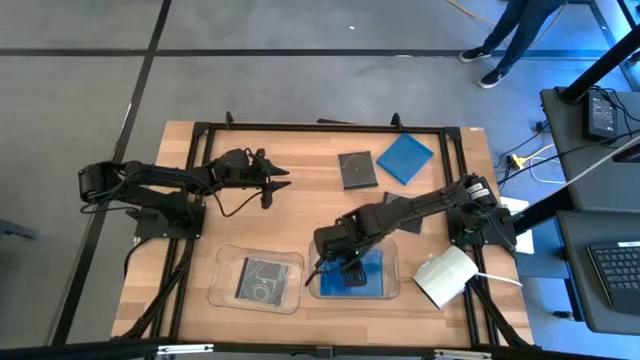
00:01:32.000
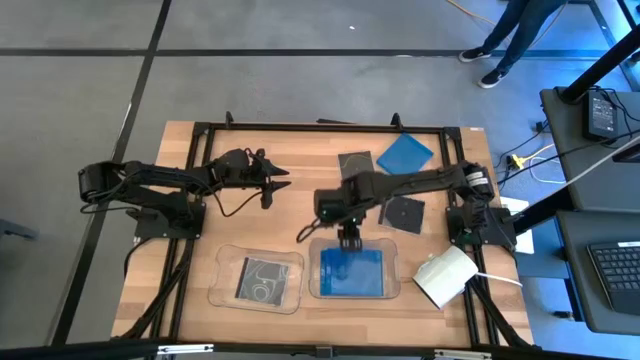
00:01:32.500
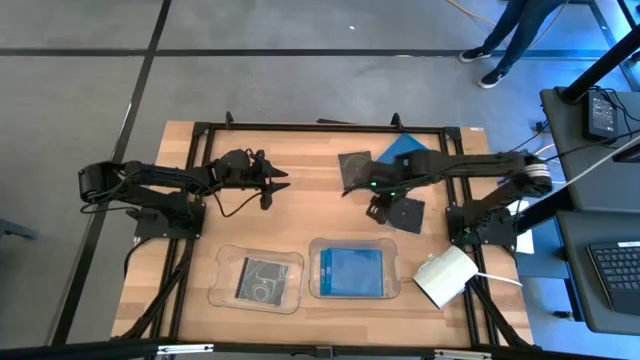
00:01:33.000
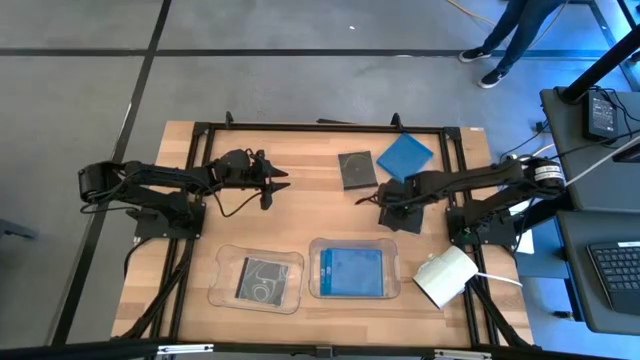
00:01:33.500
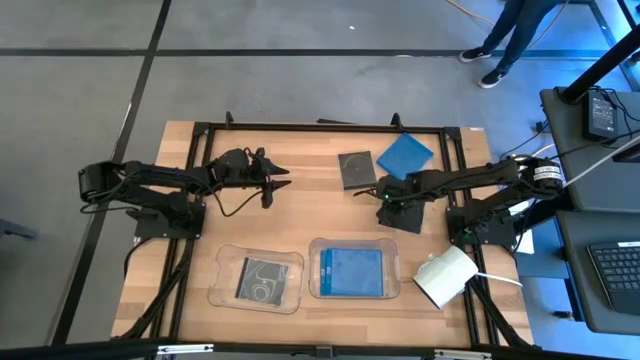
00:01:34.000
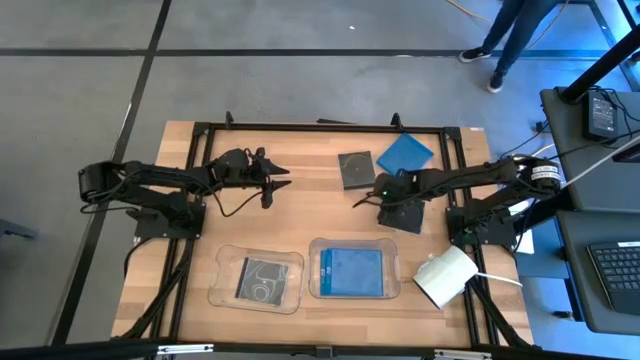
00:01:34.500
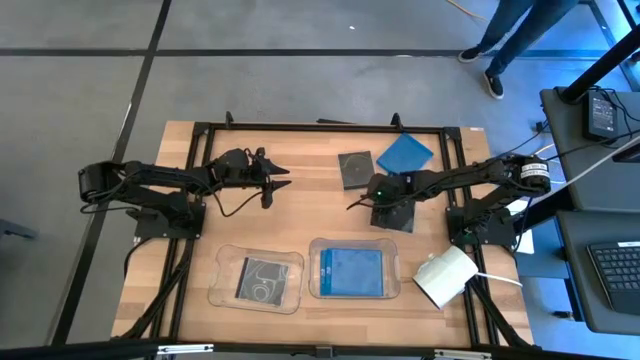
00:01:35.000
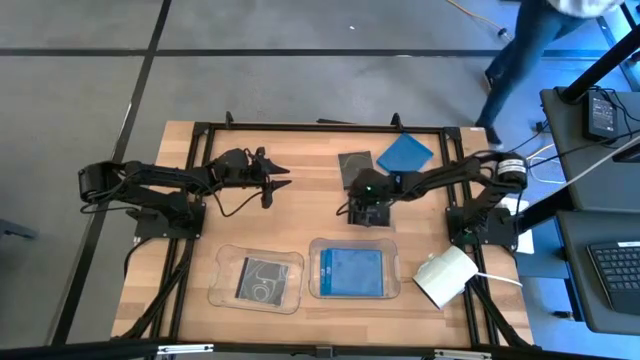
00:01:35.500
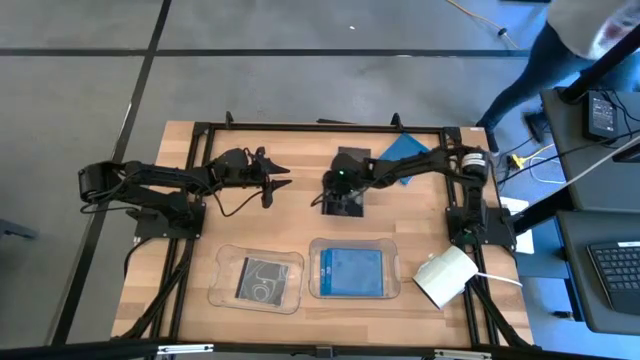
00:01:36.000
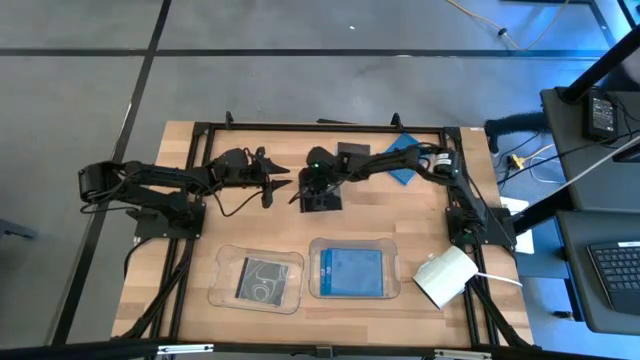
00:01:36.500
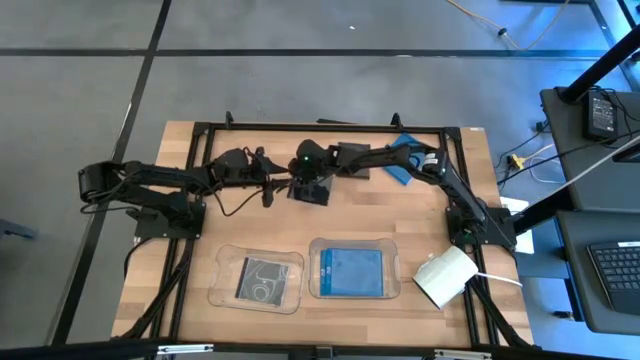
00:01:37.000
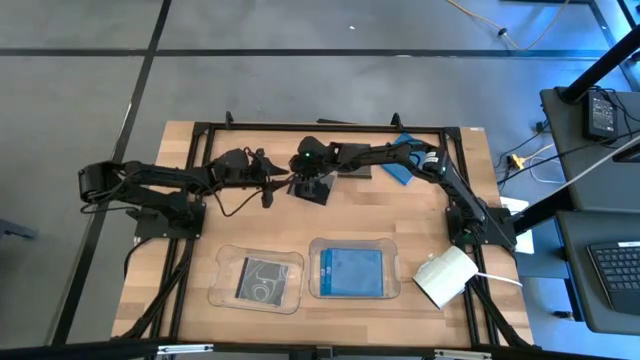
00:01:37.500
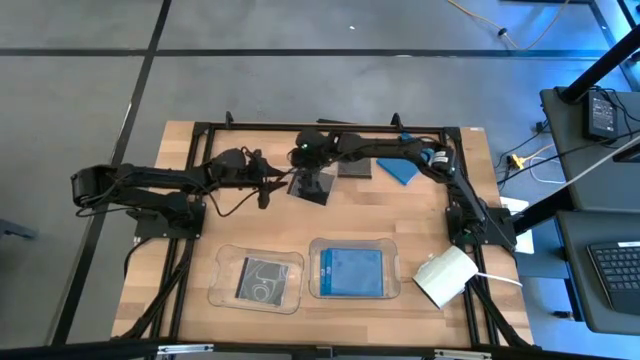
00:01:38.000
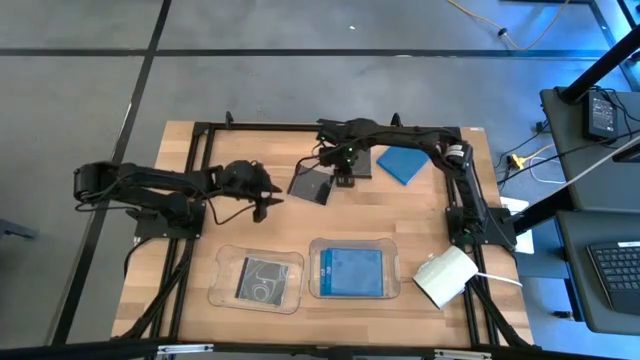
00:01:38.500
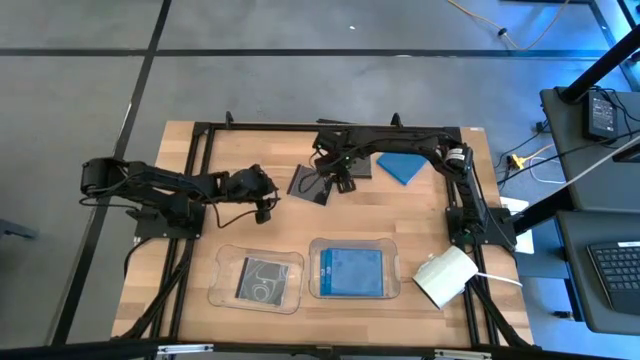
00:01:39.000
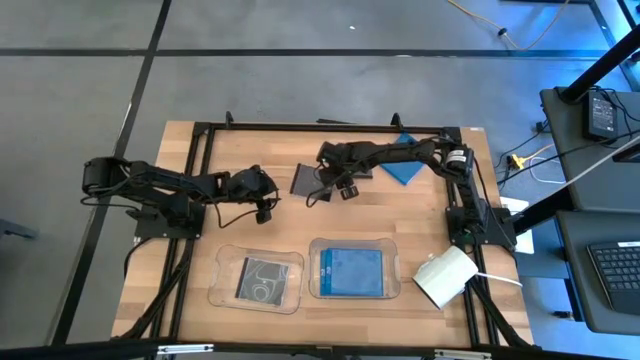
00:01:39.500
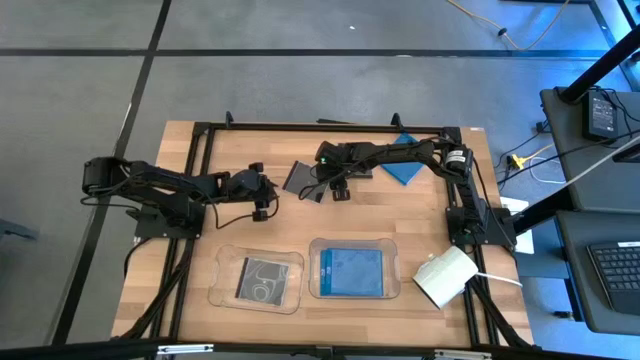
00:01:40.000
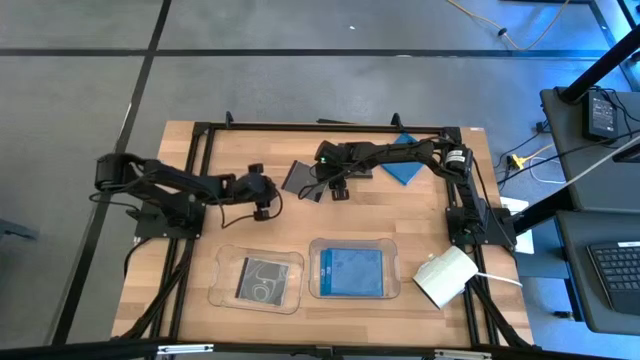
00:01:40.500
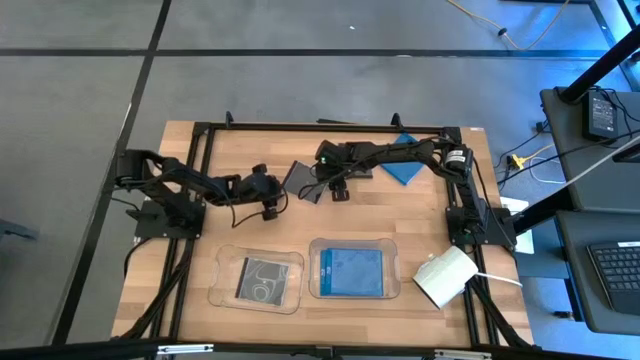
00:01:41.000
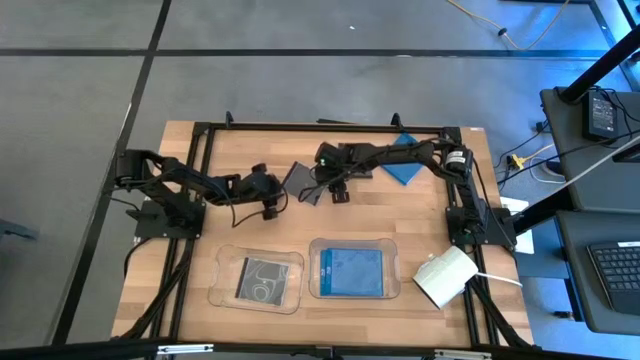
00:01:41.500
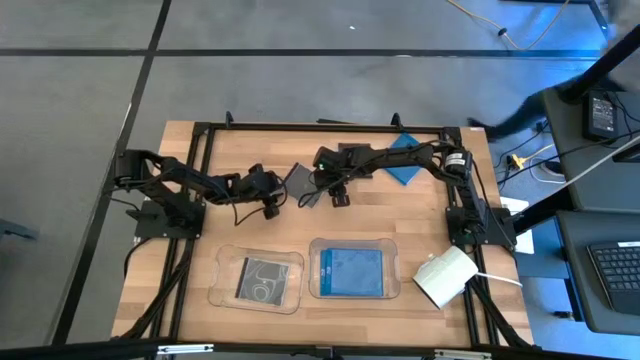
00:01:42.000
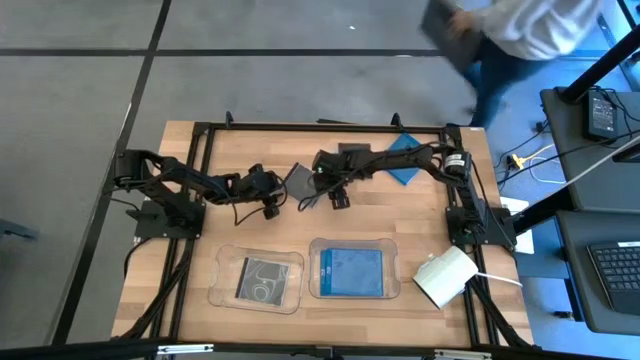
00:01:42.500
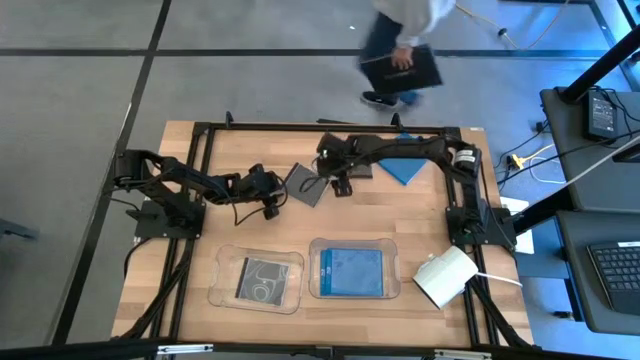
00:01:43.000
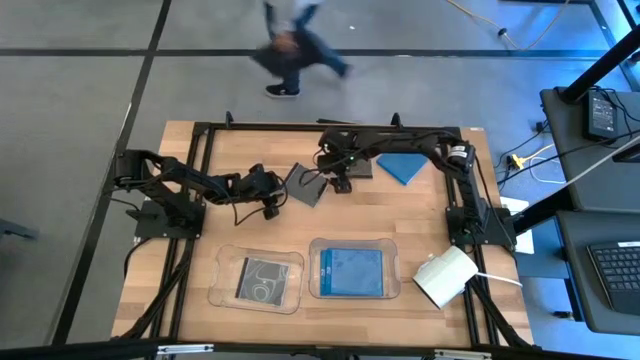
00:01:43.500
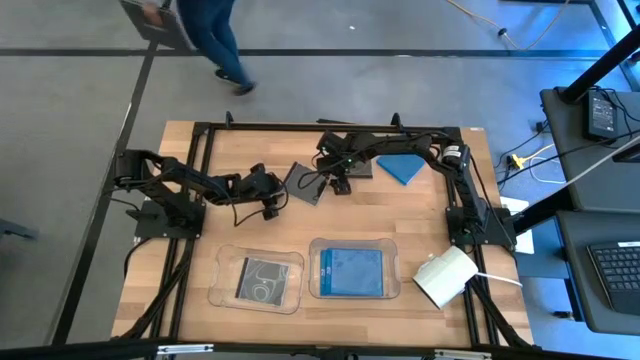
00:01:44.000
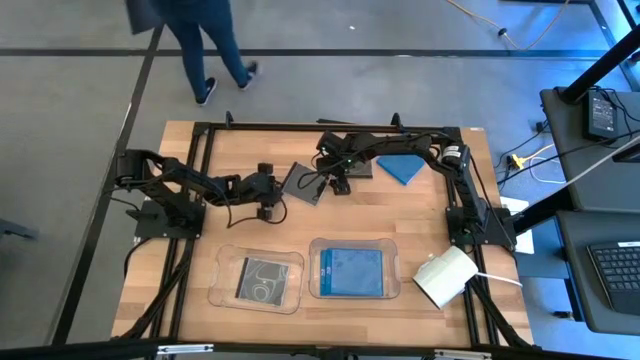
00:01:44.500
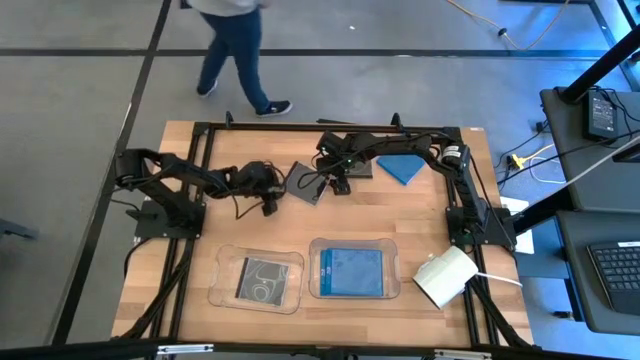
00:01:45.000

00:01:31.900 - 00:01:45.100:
Task: Pick & place jewel cases by type
Put the bottom black CD case into the left transparent bin
